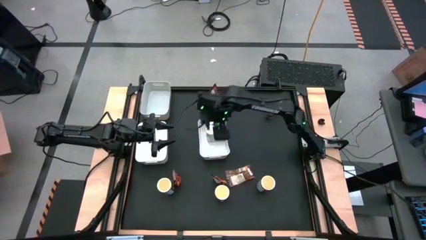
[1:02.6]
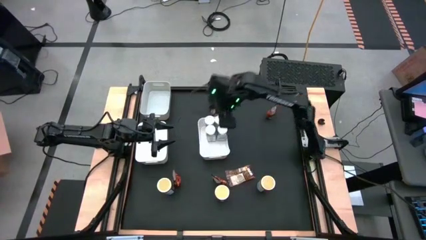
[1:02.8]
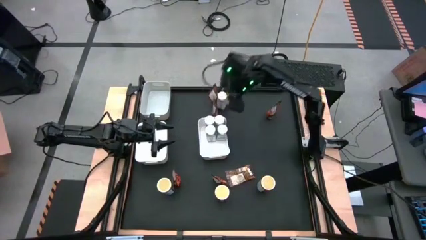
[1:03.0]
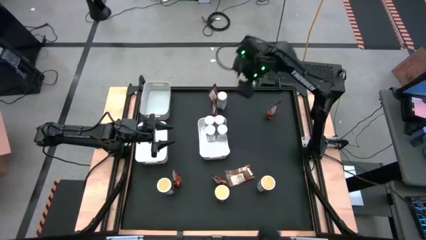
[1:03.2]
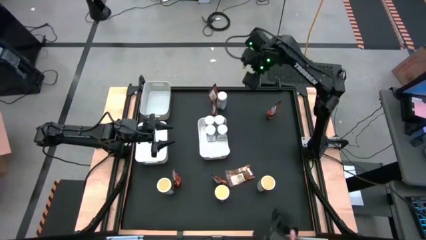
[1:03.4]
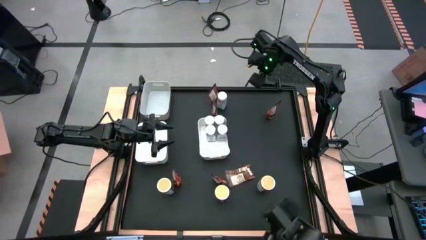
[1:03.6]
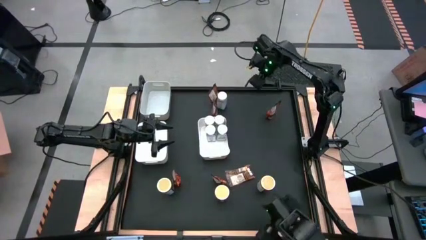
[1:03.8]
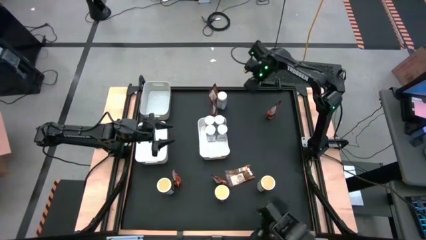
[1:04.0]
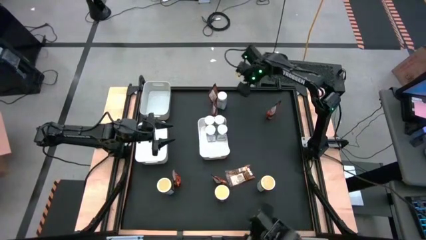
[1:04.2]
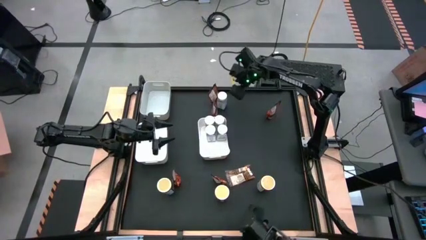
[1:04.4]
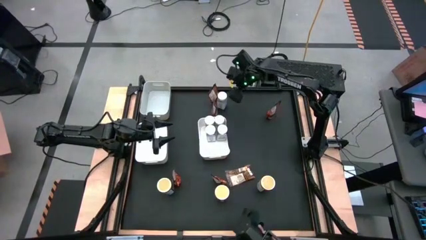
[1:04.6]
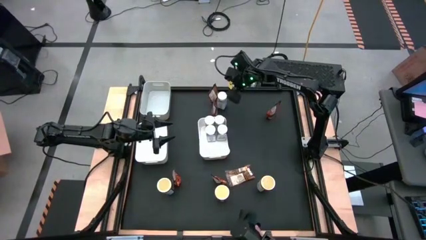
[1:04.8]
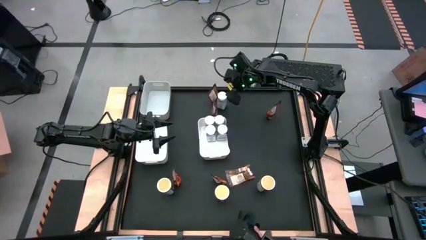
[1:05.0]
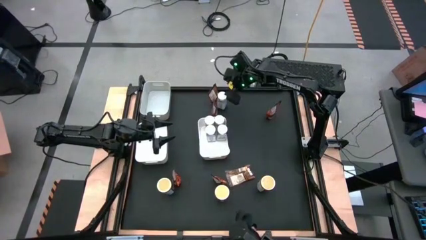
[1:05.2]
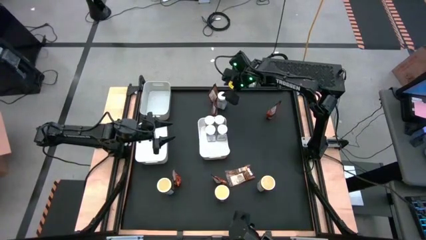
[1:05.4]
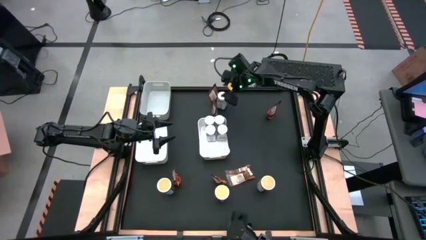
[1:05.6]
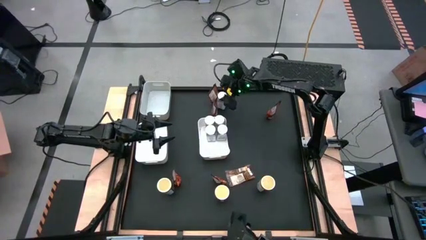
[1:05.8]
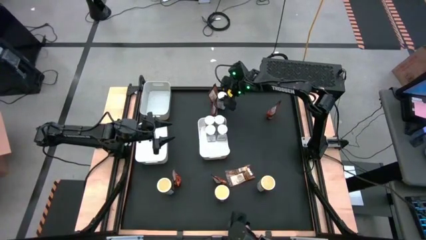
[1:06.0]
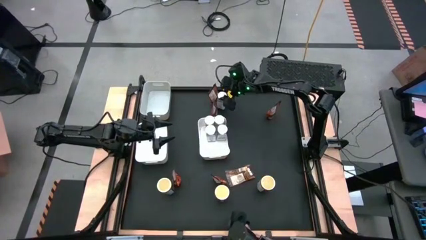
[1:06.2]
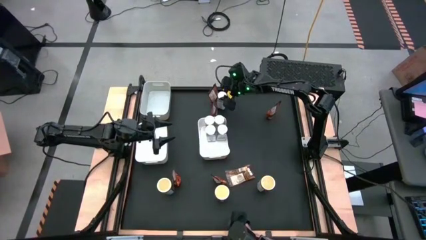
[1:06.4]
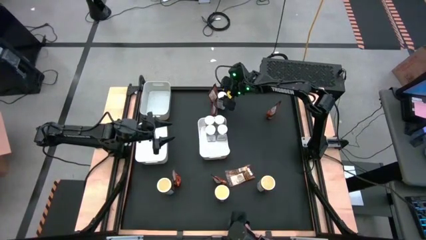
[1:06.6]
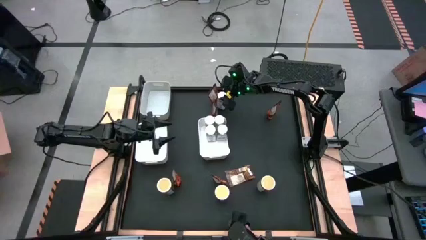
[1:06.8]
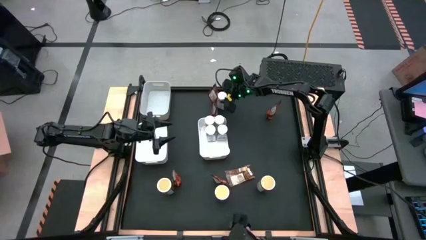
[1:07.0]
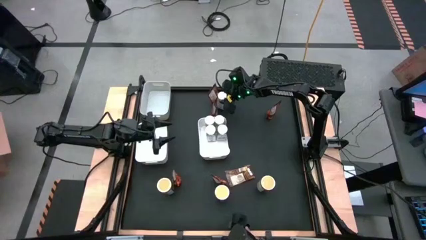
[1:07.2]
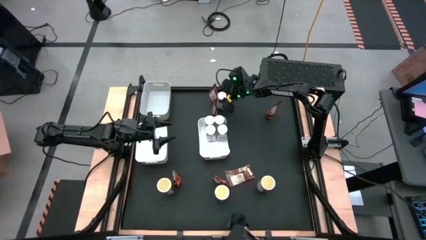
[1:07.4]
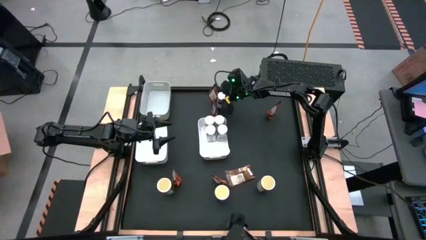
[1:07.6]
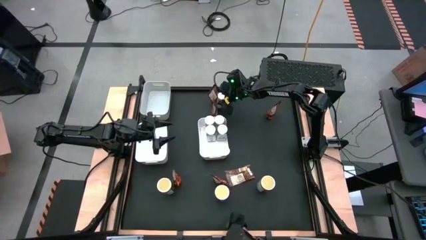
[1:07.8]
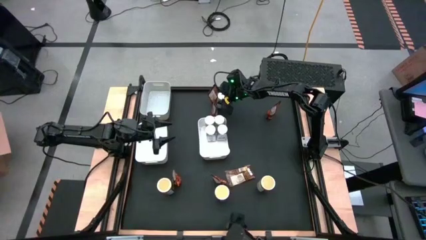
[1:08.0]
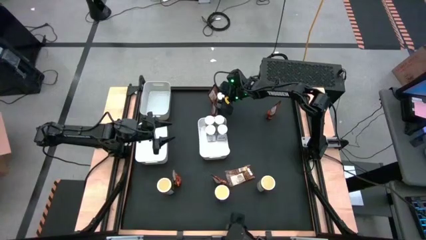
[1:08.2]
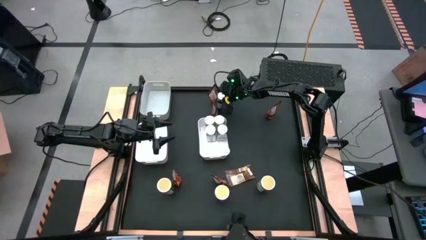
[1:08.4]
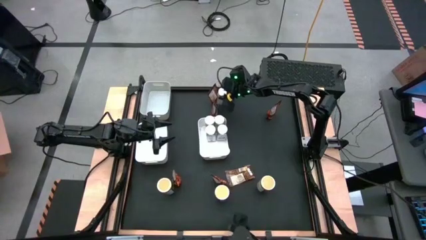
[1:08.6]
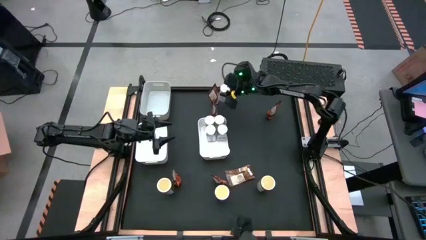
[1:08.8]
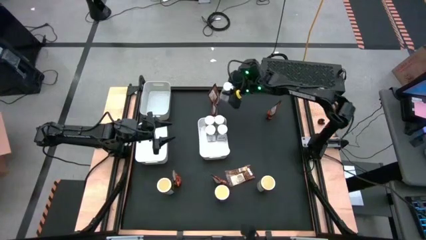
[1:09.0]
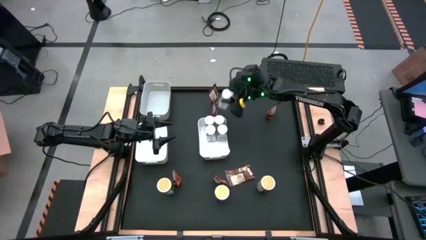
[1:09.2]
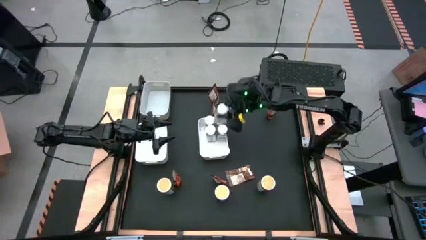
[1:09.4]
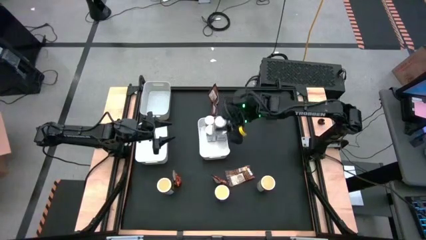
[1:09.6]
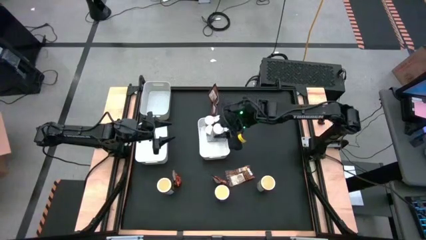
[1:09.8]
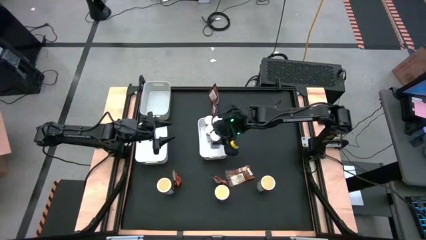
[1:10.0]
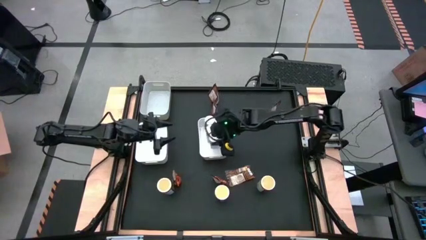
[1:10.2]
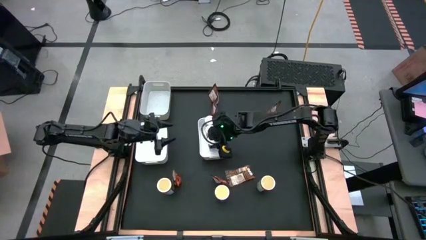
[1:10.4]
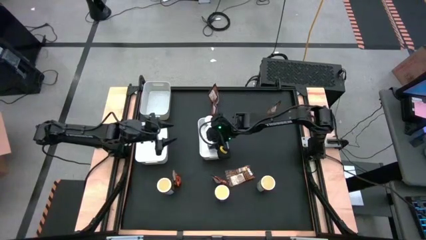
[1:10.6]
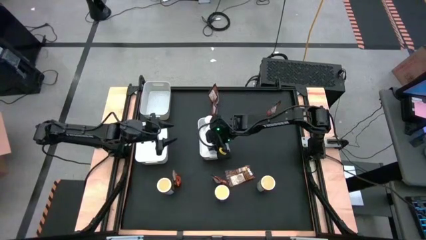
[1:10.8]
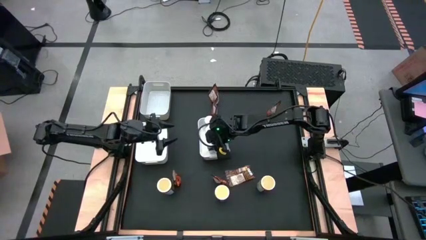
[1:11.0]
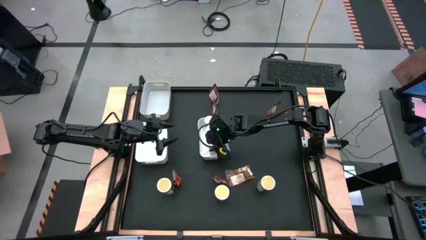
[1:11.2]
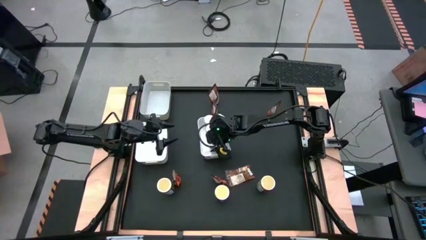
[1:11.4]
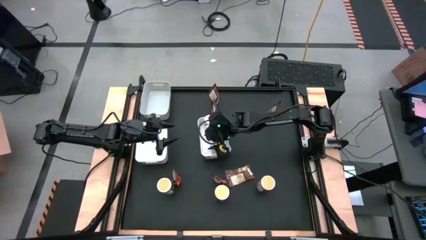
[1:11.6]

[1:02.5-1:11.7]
Task: Sort spices by type
Put the white seasoning bottle into the right white bin

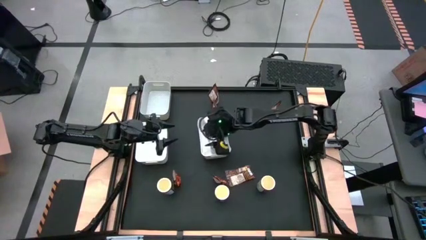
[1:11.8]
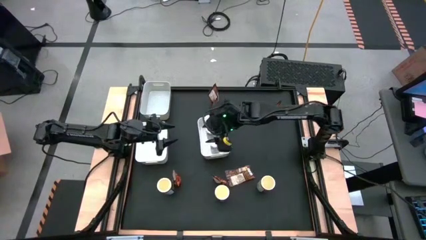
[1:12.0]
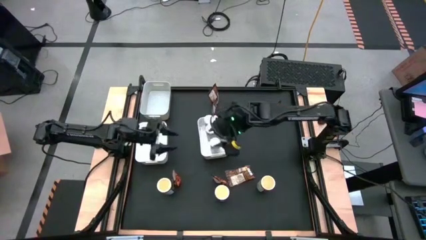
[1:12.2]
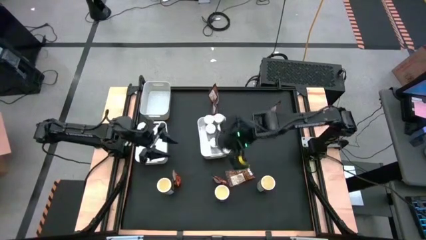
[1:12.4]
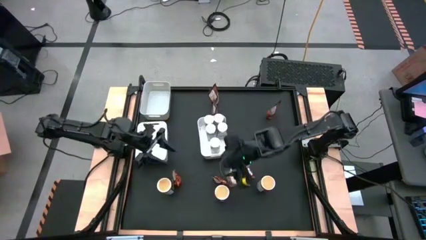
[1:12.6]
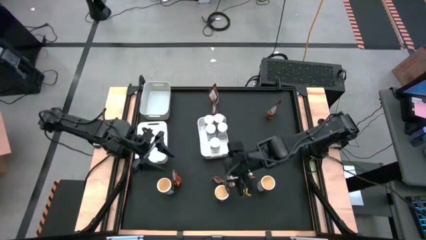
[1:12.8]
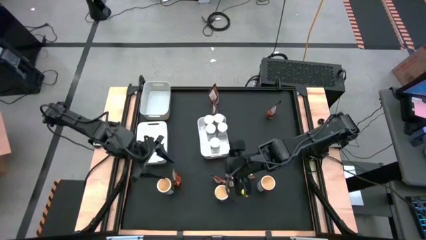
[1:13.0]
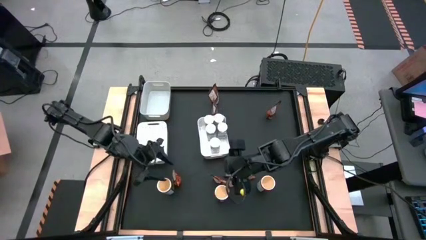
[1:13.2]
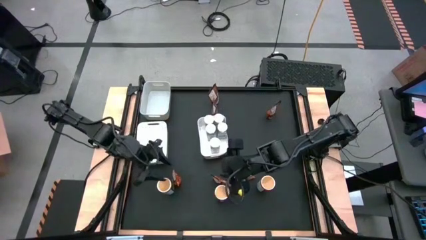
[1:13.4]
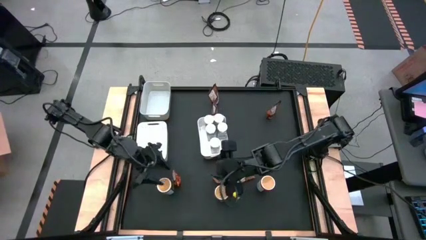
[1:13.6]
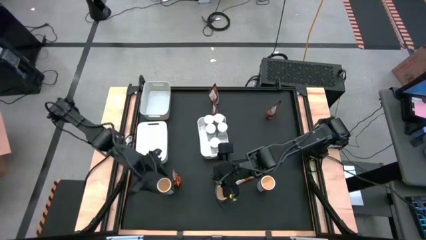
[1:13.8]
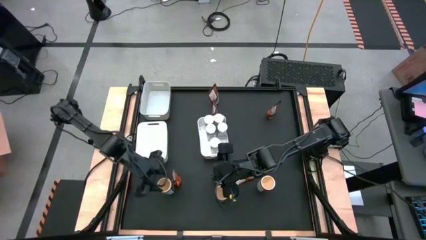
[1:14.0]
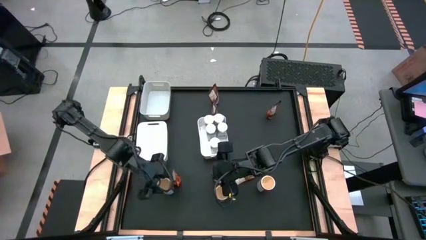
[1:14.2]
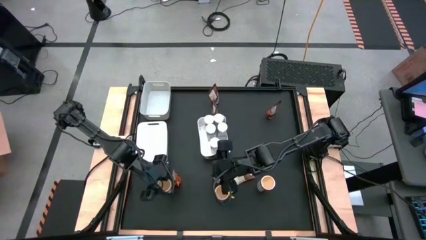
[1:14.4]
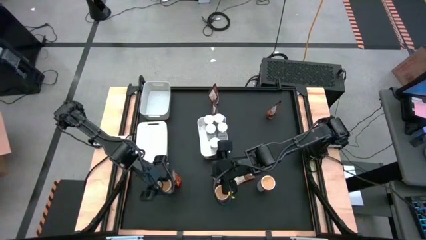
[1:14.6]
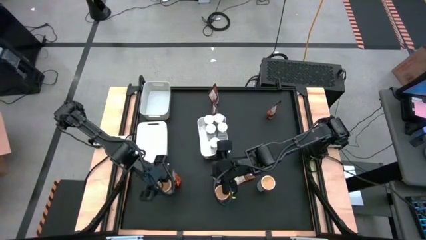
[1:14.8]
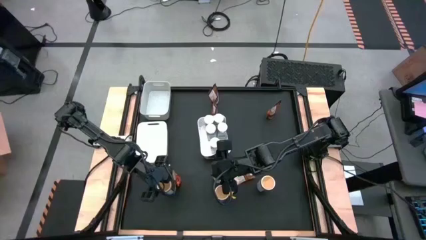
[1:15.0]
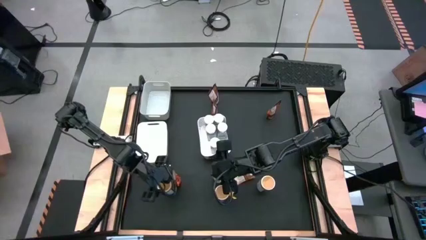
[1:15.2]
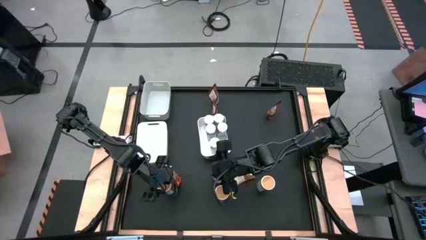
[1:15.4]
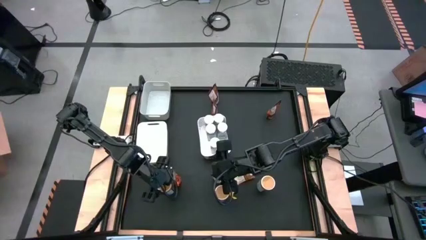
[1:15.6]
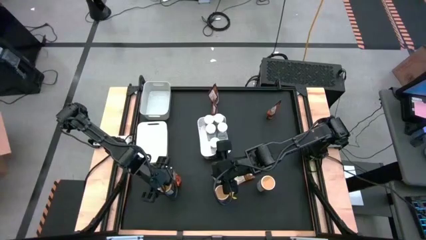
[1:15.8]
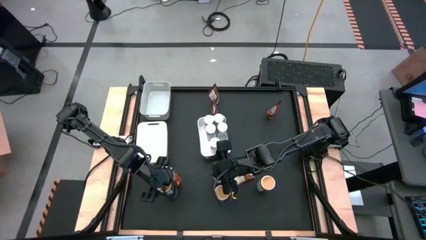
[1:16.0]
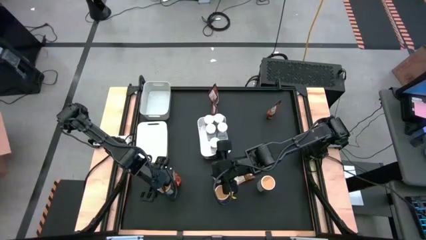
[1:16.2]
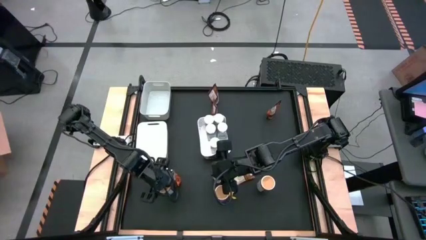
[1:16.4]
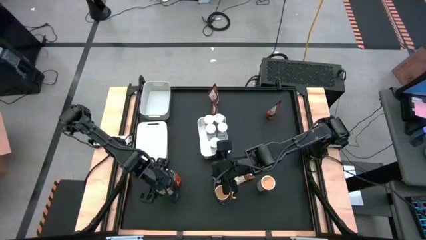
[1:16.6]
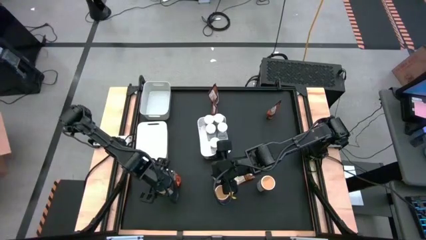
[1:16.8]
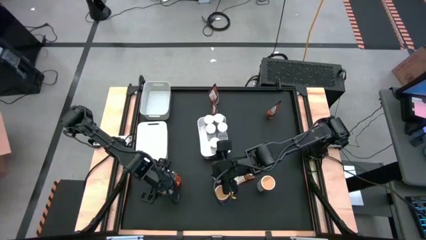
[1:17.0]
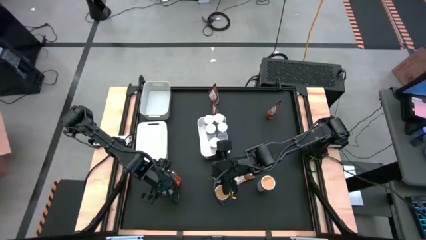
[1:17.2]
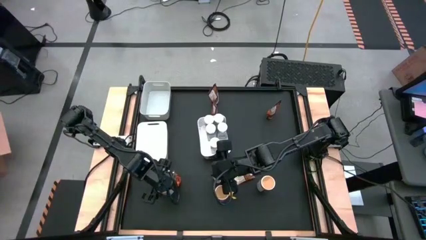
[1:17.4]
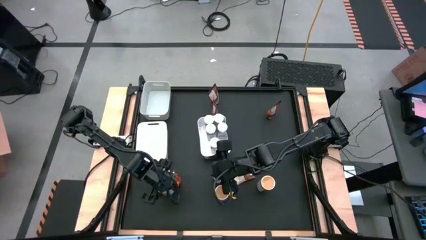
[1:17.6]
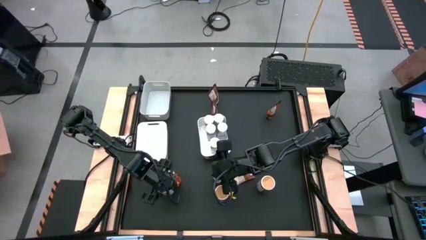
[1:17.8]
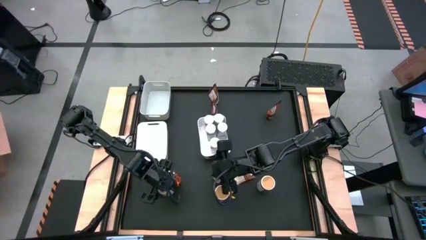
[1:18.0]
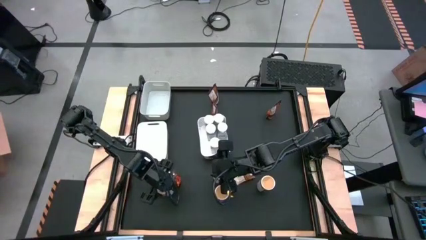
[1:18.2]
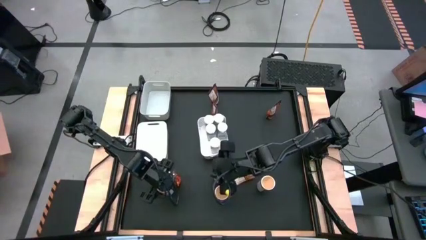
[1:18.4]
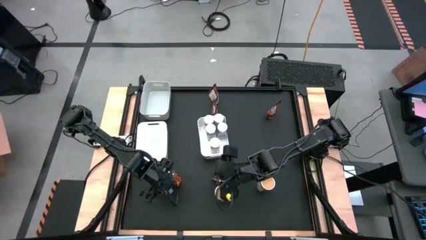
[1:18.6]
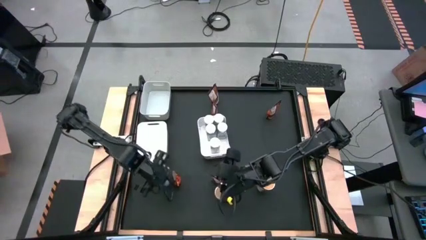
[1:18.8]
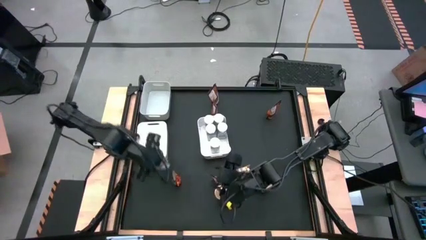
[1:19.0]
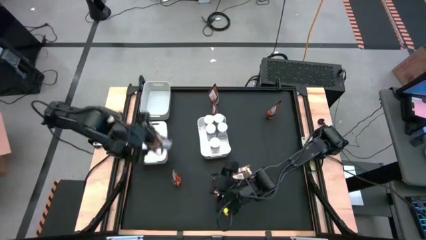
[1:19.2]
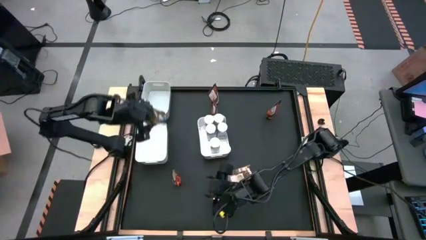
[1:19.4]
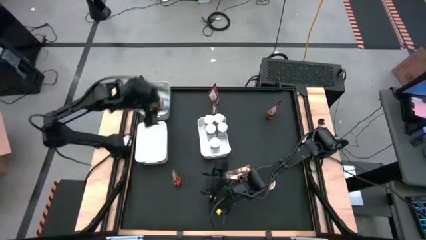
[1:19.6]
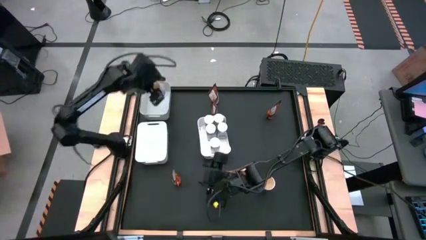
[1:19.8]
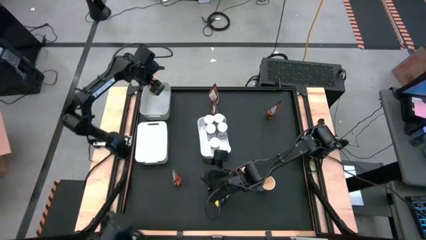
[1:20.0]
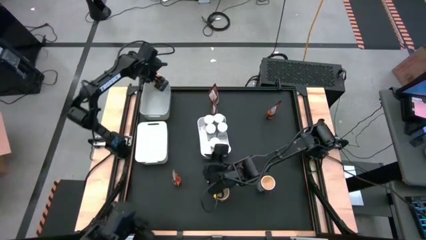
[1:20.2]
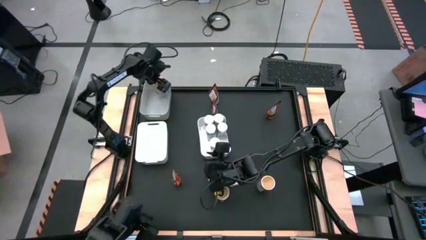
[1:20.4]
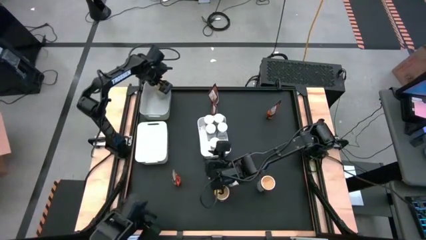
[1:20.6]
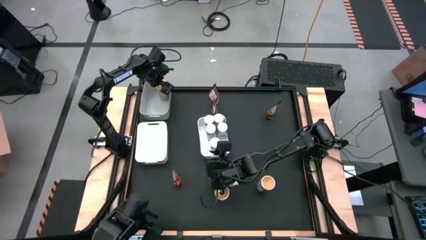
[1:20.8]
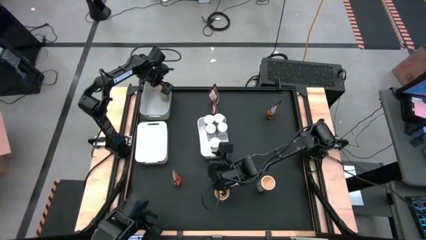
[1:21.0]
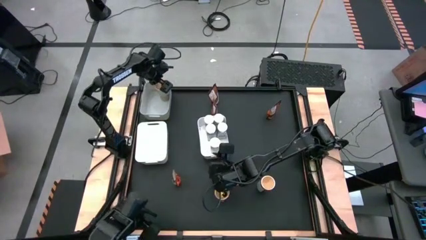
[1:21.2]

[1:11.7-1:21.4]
Put the gold seasoning bottle into the gray bin
